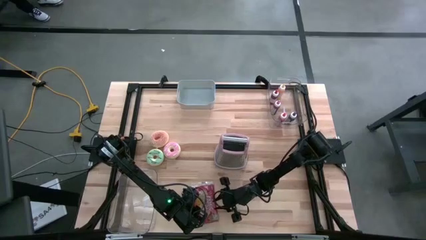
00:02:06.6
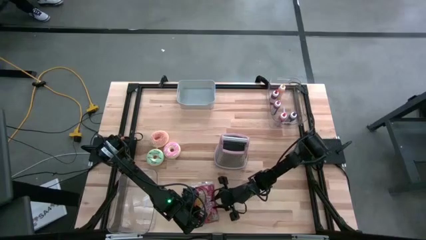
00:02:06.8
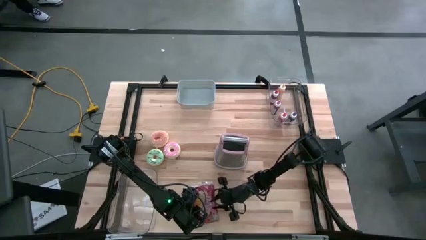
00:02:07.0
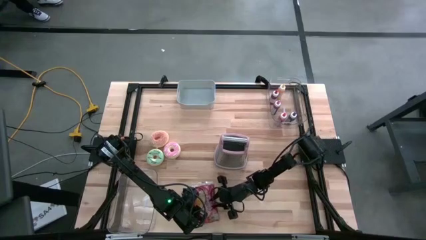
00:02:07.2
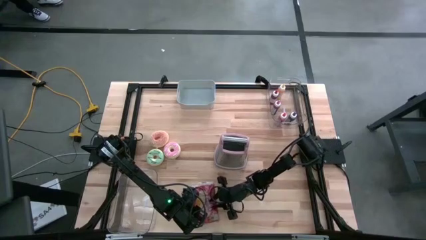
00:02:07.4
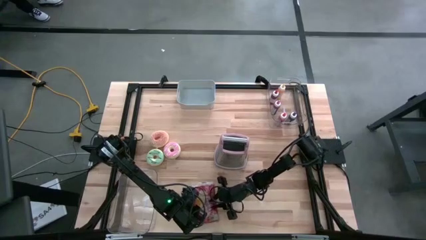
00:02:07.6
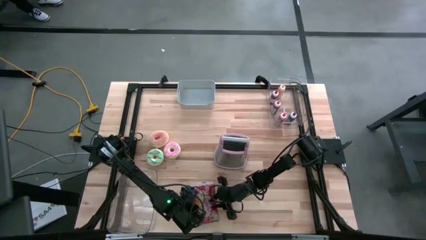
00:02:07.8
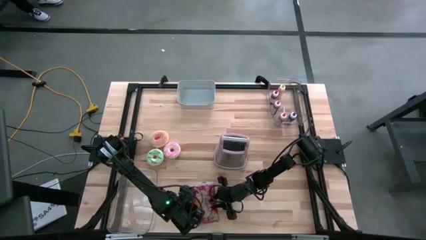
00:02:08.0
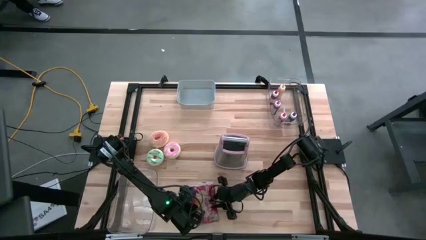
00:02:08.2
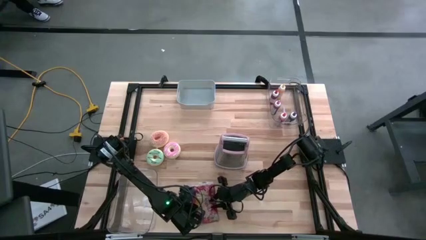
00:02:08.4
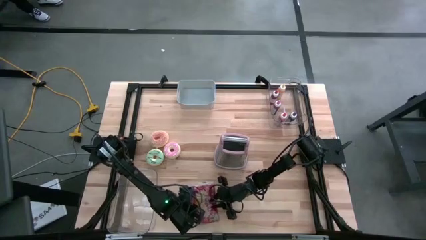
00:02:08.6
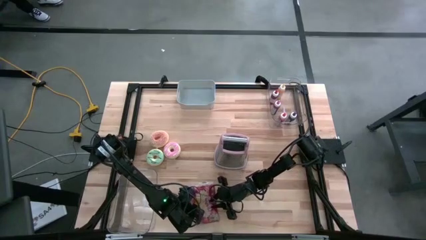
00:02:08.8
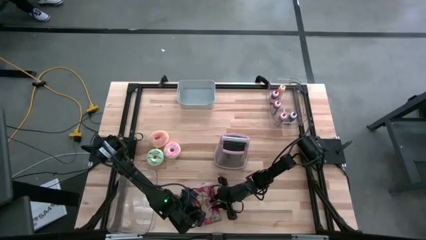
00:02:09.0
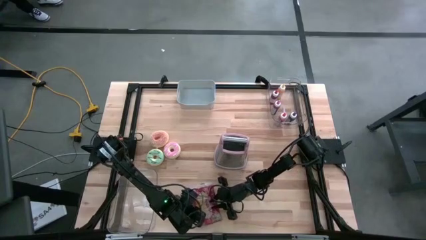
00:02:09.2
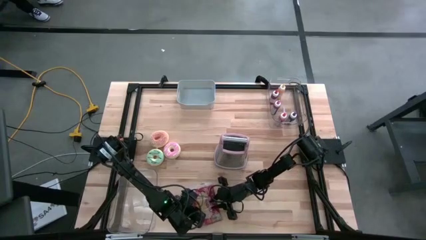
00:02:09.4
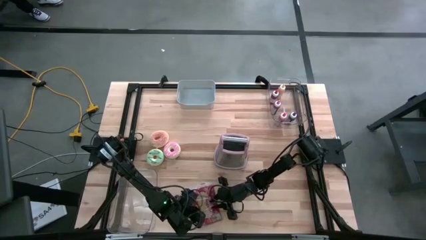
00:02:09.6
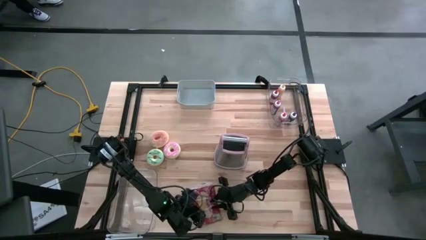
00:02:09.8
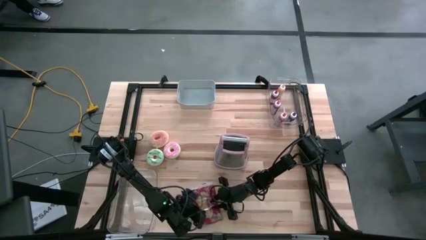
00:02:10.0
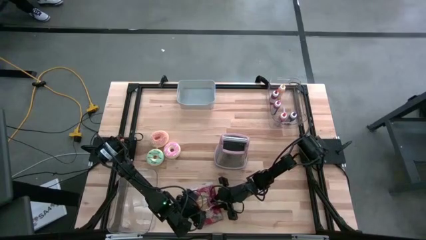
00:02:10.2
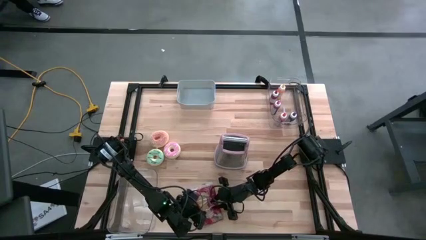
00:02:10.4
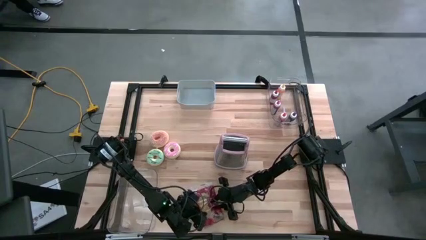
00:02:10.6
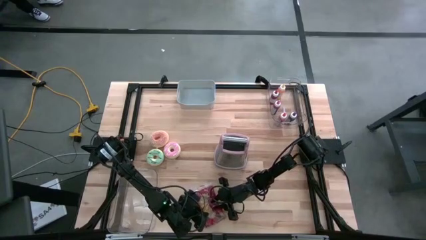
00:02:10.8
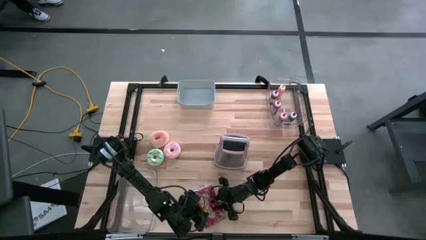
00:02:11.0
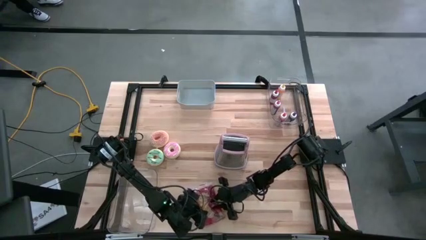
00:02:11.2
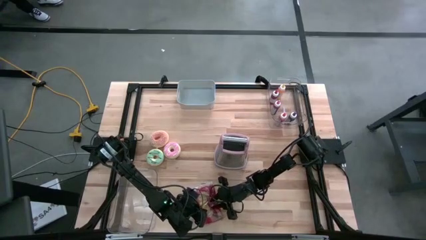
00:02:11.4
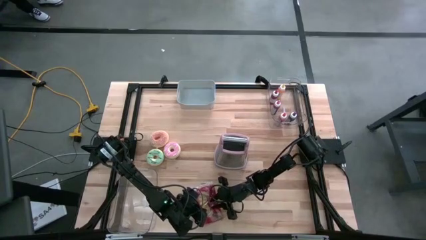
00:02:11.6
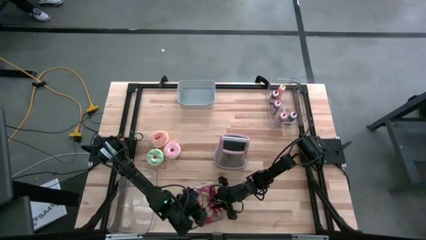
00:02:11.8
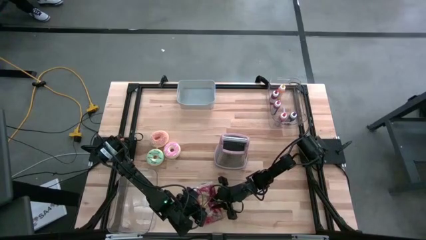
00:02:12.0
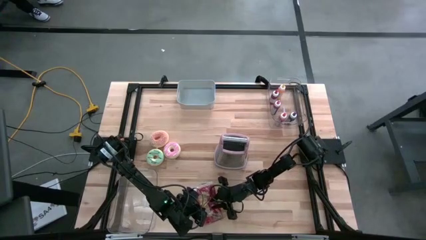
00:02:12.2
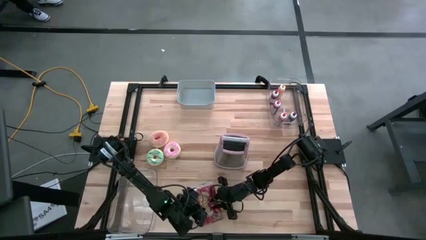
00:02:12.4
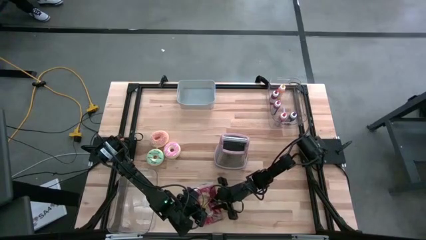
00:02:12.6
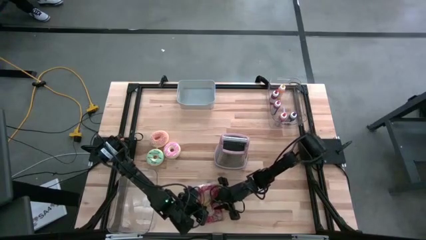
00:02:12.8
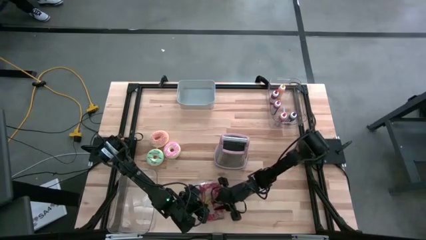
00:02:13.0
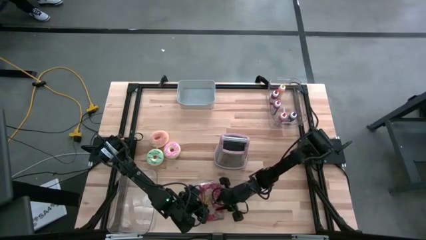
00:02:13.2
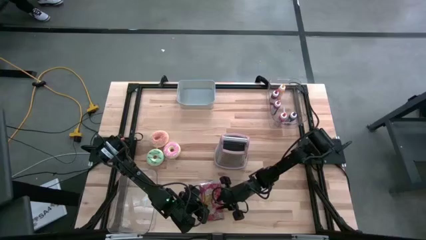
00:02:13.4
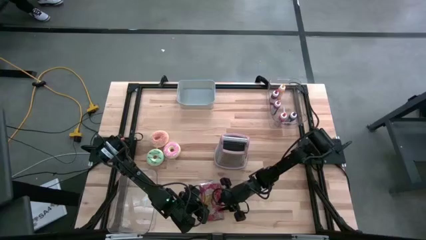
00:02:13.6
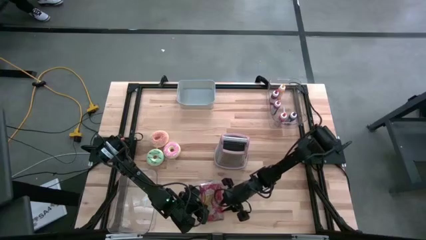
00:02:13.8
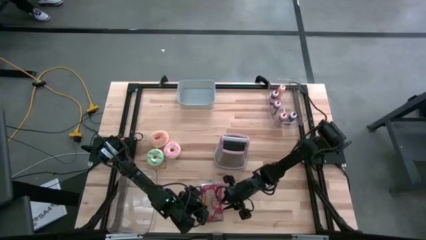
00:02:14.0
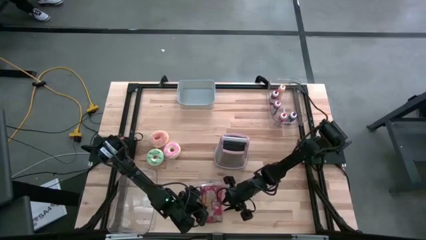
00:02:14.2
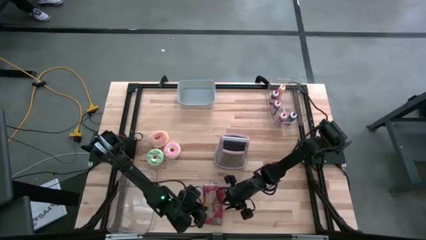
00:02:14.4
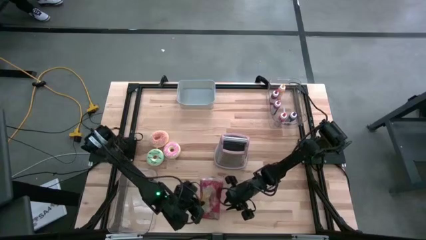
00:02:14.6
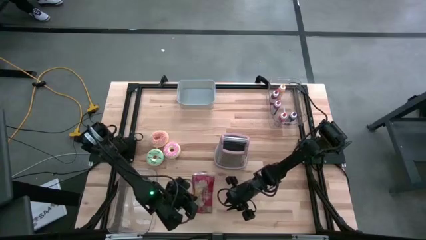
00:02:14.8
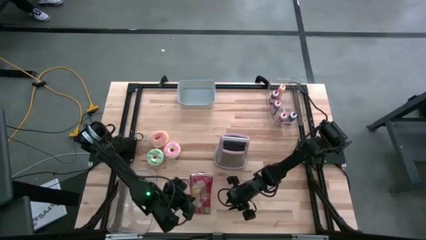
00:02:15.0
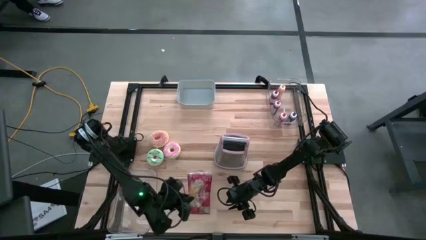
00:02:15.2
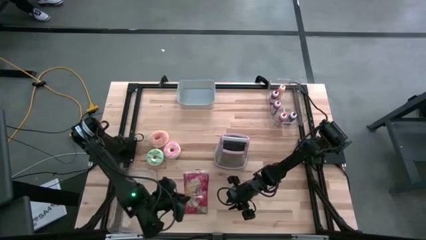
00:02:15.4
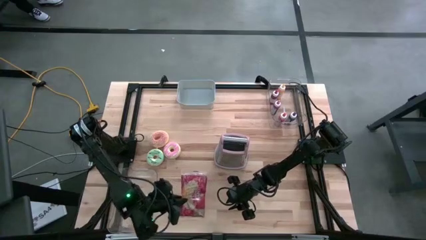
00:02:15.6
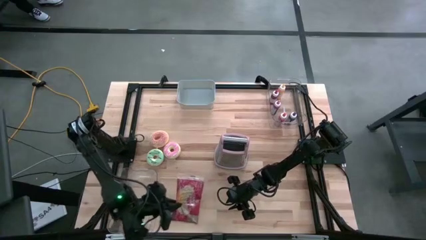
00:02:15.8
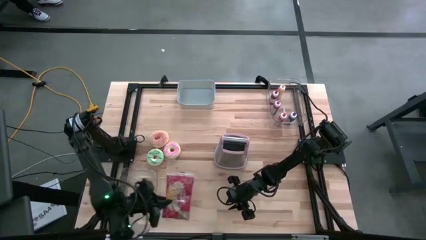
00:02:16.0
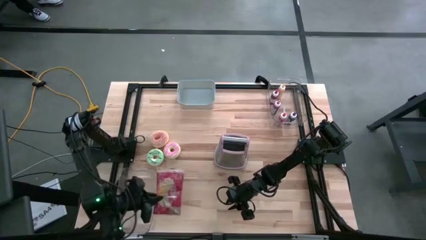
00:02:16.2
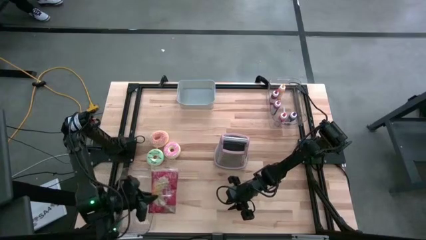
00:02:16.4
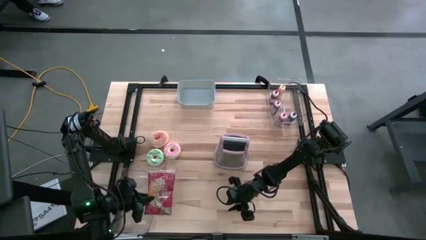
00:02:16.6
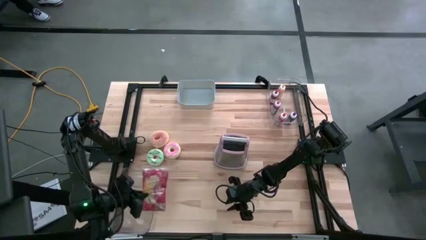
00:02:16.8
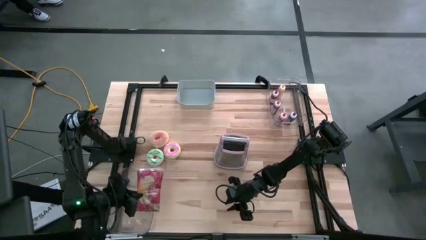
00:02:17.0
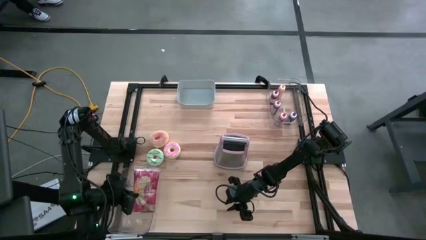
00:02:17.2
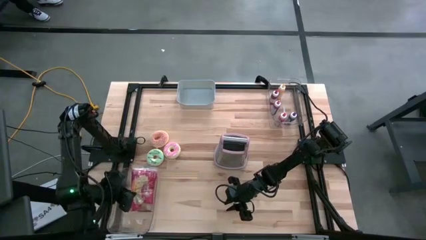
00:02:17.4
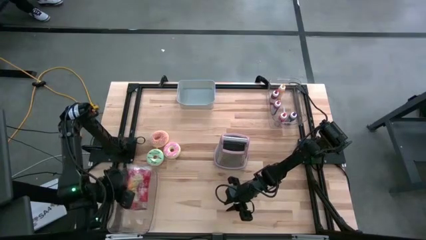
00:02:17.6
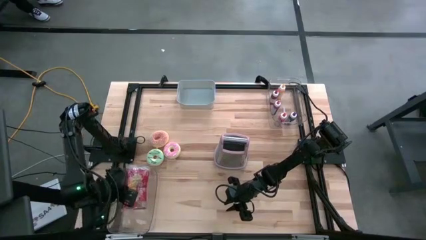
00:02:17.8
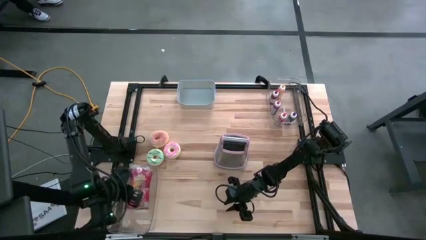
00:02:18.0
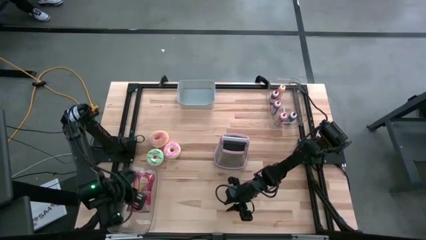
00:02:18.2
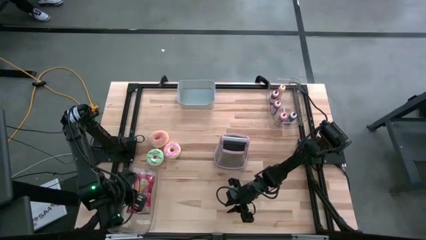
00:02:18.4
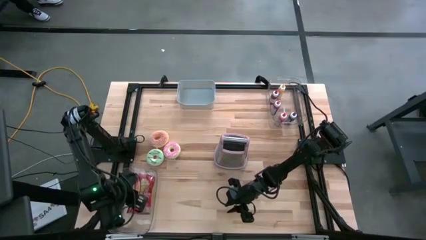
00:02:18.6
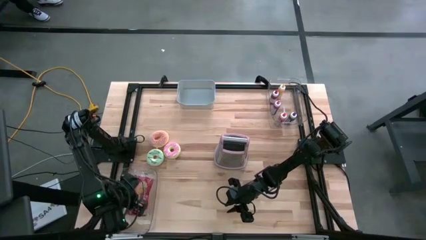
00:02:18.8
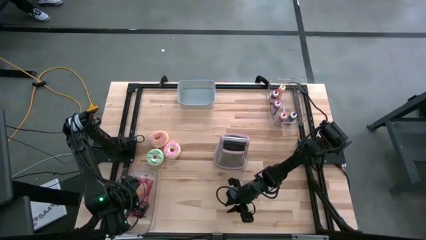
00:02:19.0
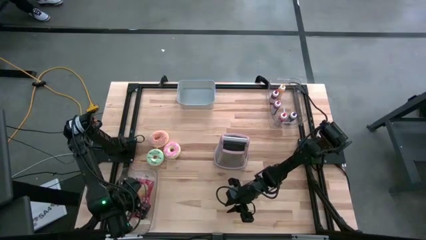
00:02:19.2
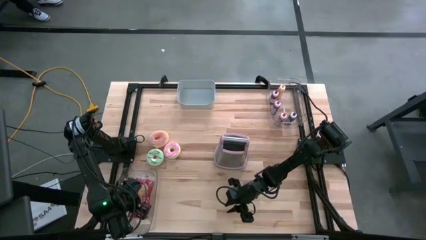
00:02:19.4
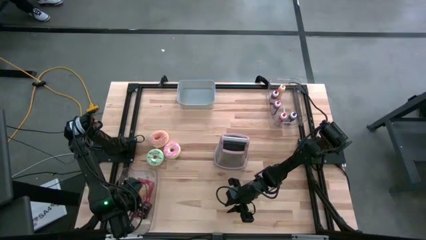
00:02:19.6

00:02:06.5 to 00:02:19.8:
Put the popcorn pack into the left transparent bin
